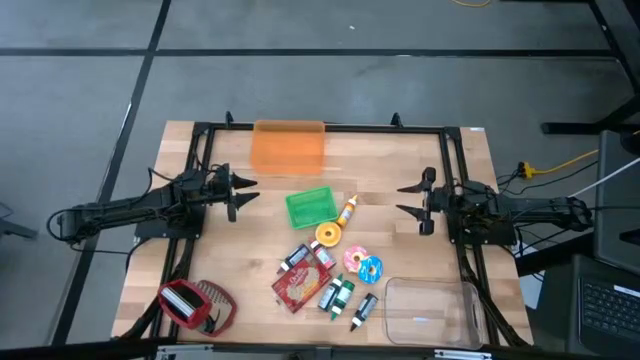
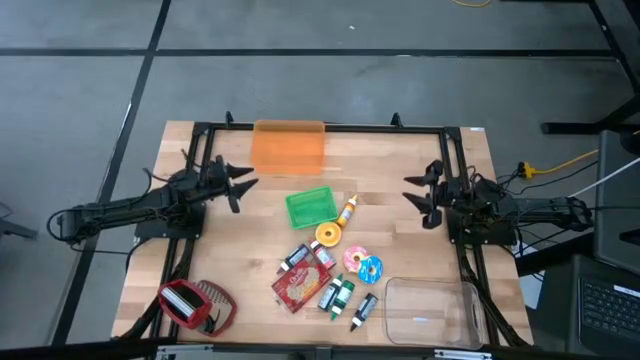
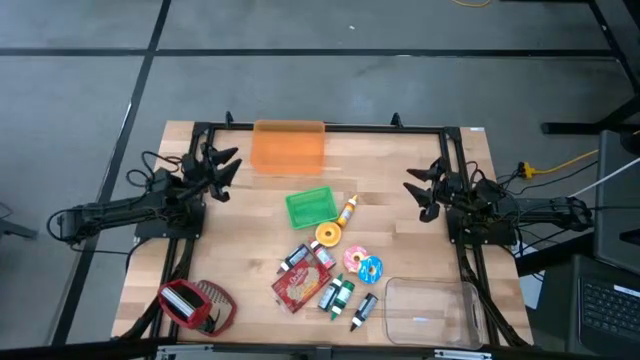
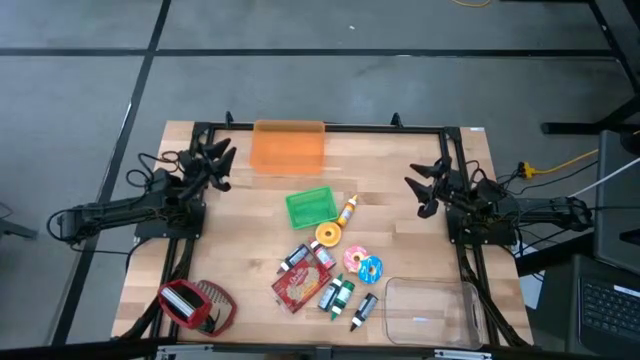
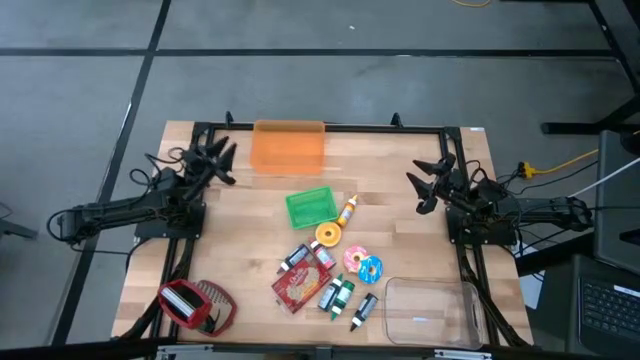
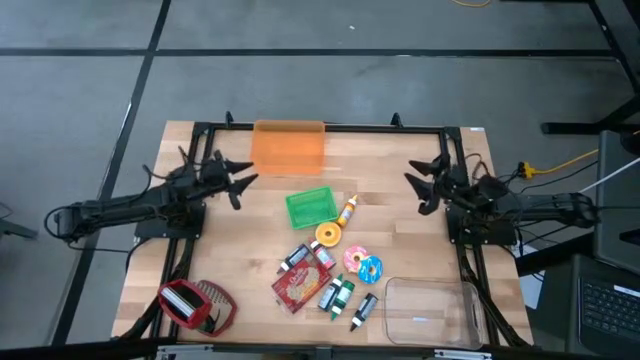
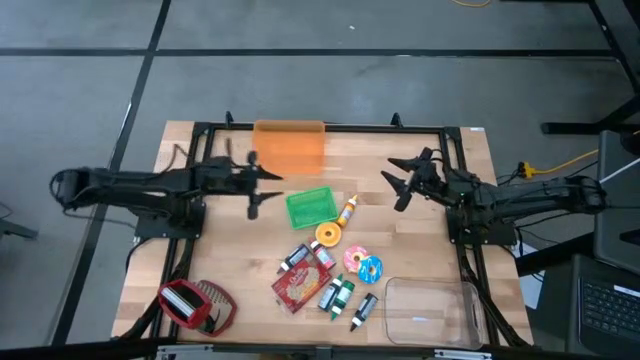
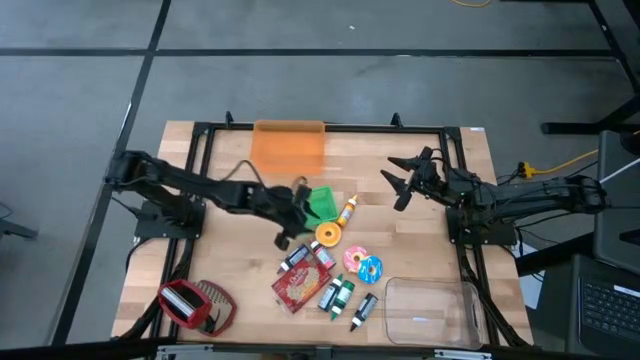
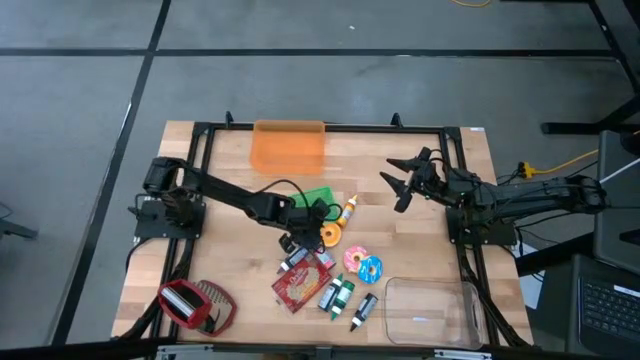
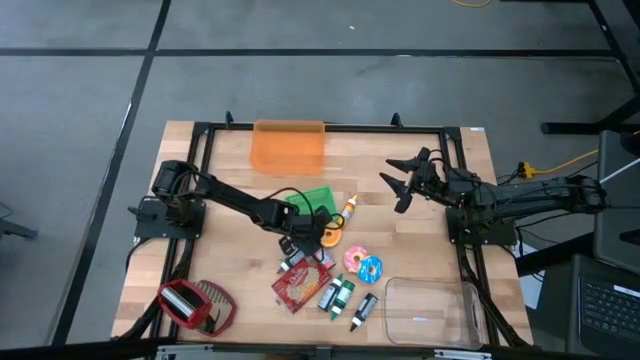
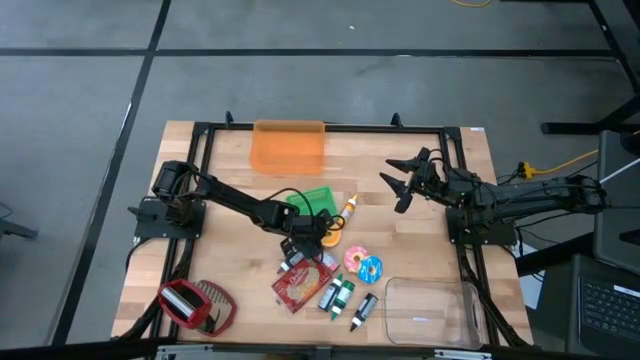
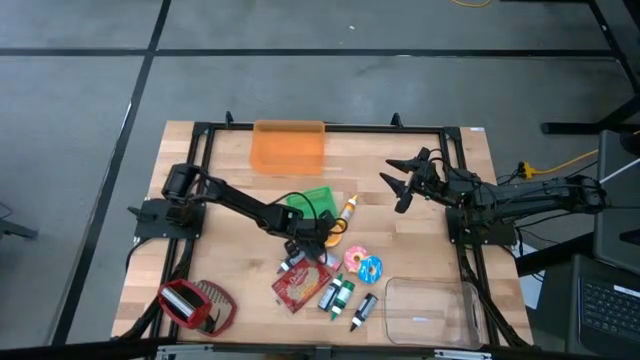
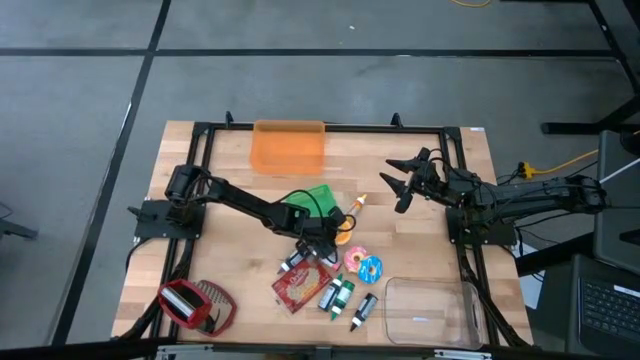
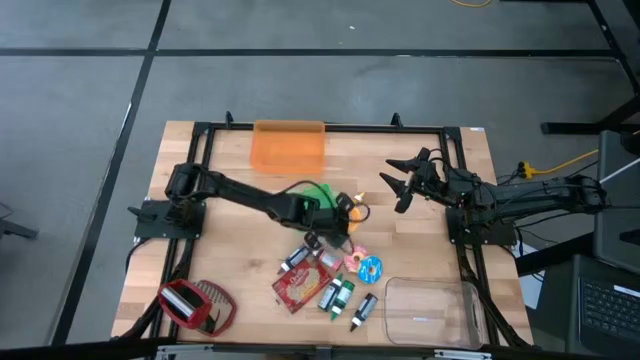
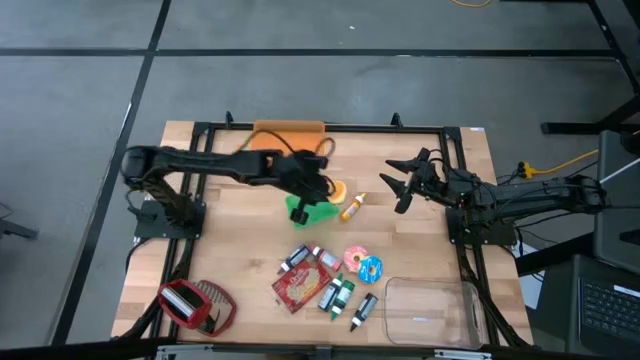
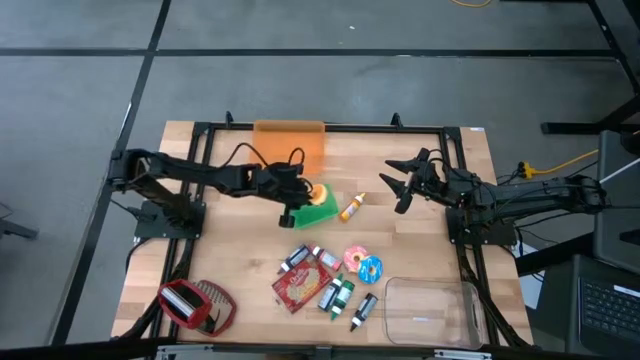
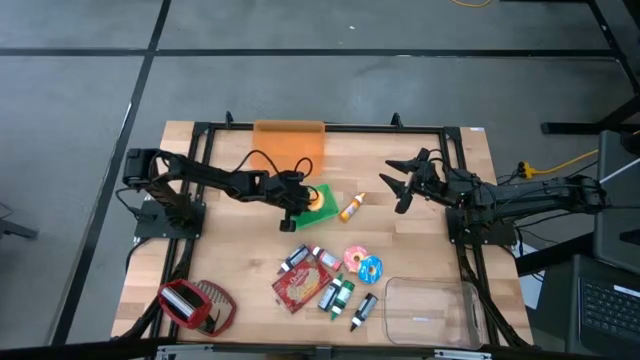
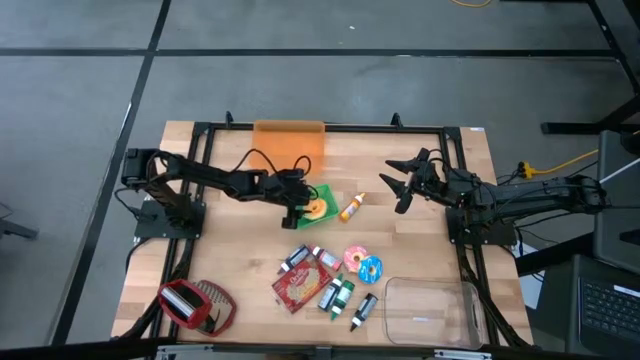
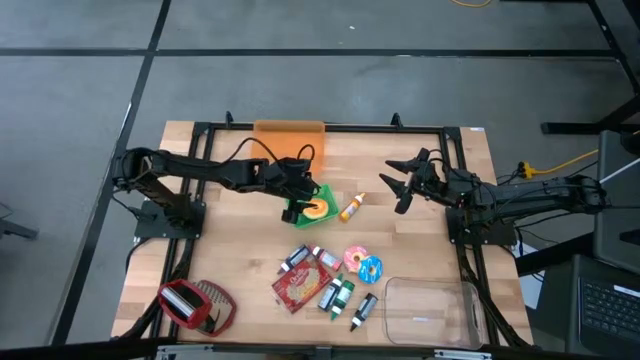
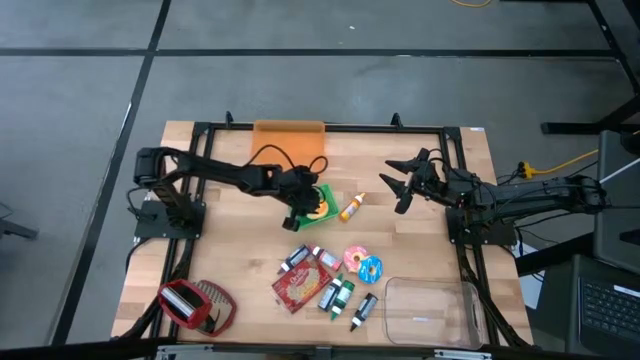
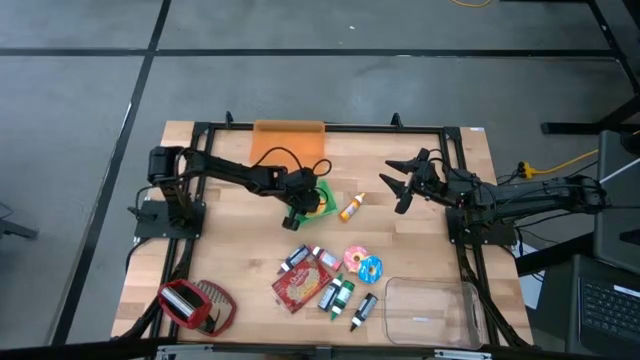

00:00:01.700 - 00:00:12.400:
Put the orange donut into the green bin

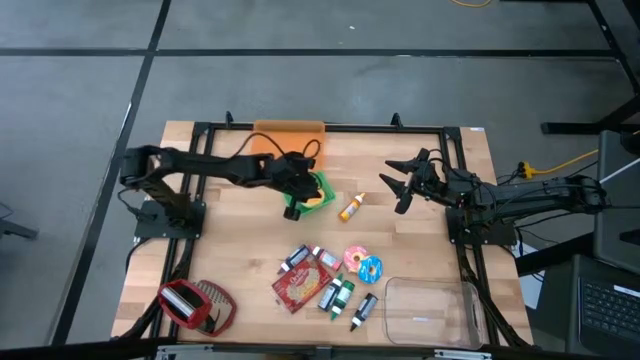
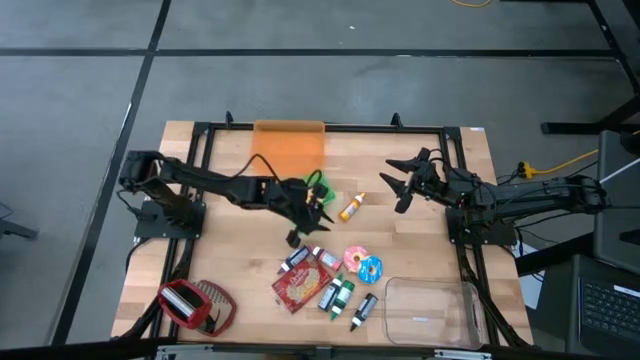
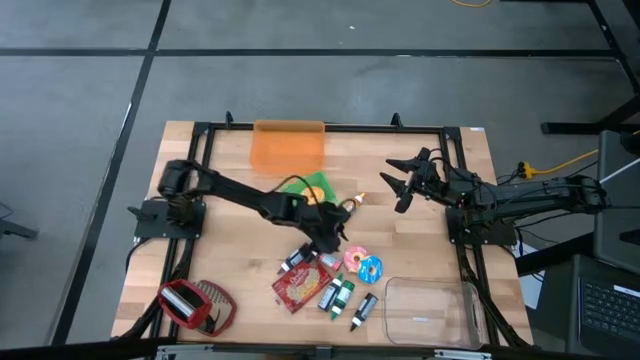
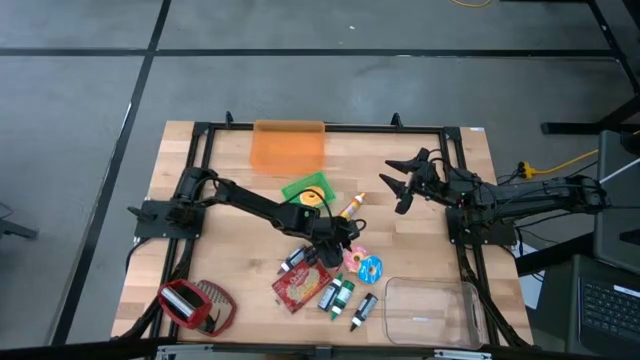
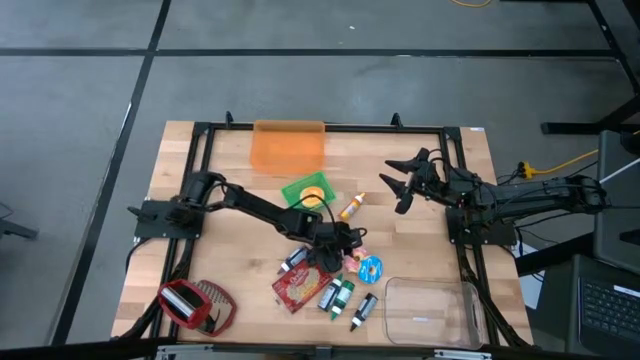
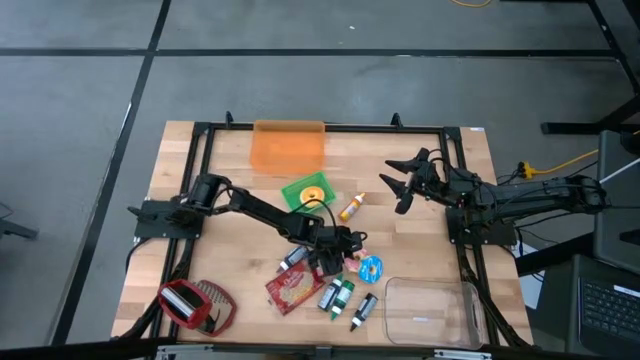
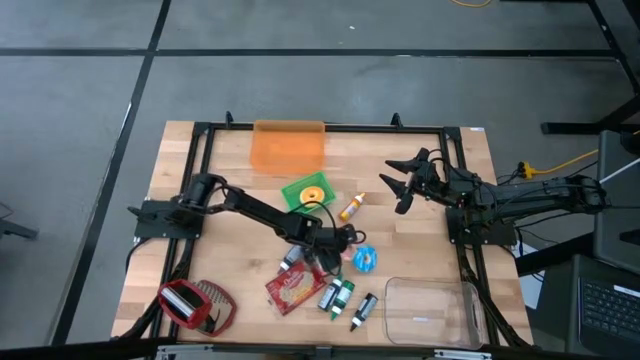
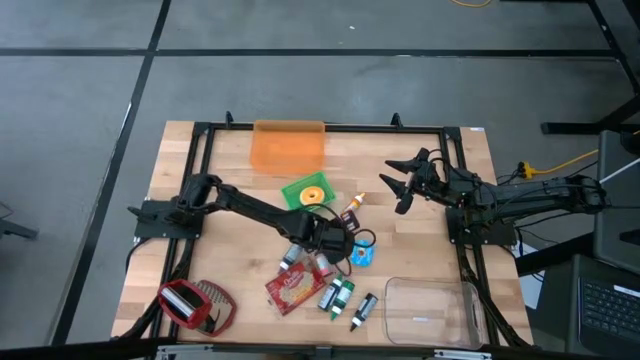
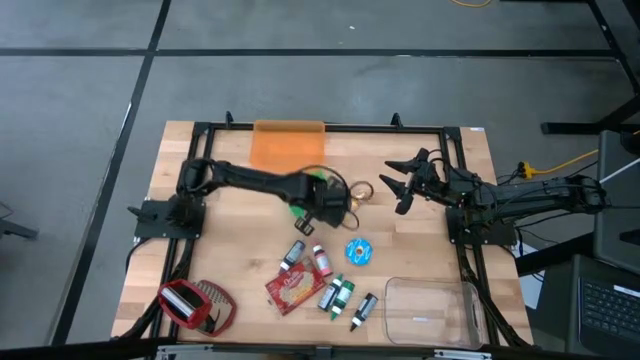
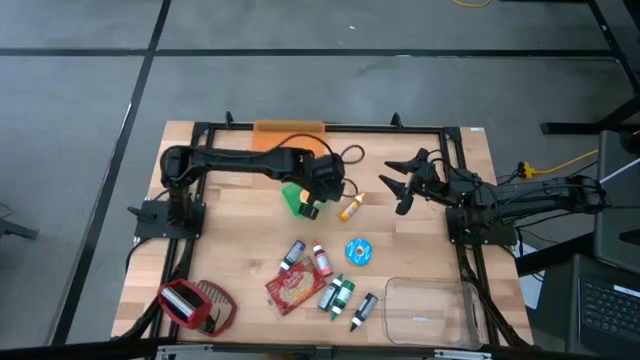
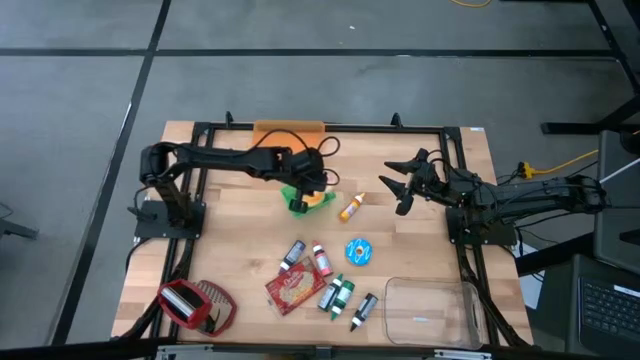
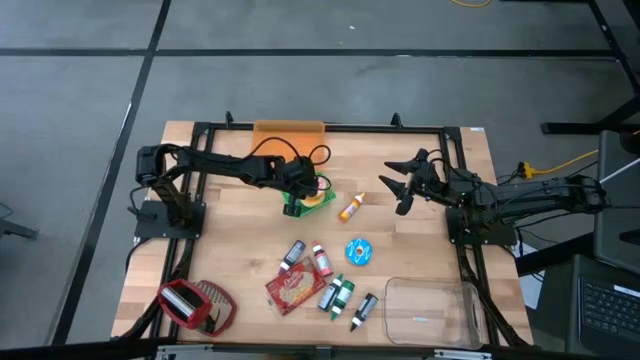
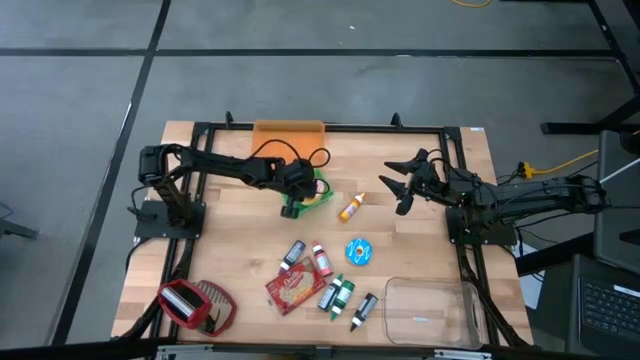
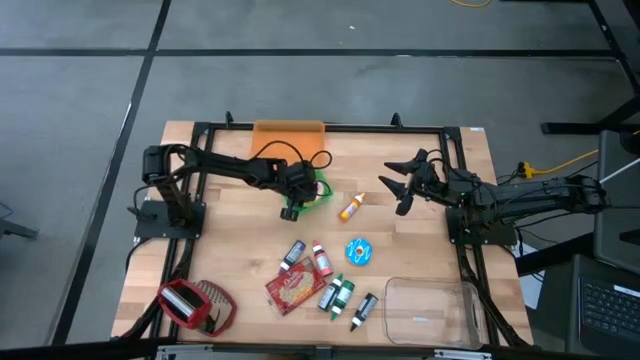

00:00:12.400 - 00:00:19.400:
Put the pink donut into the green bin

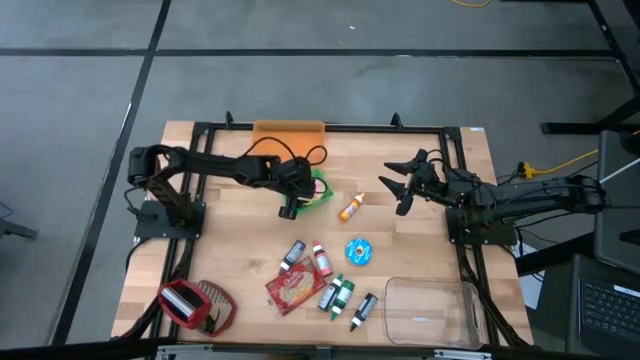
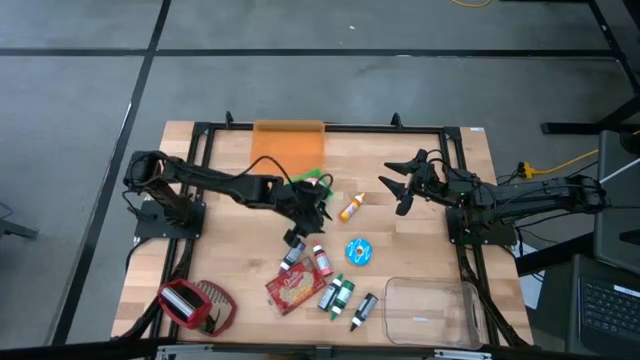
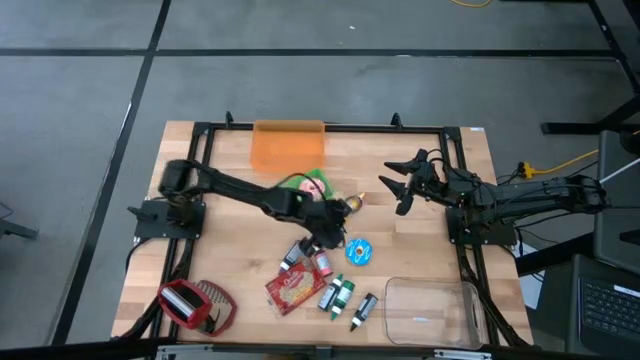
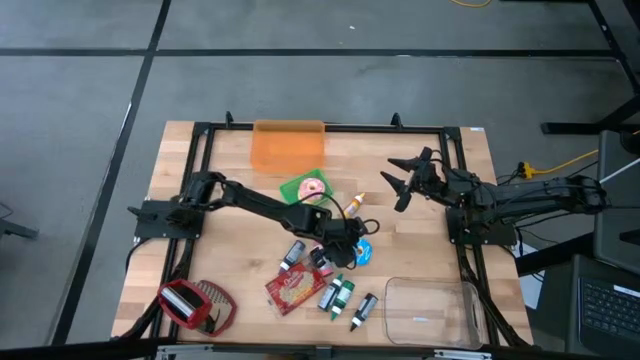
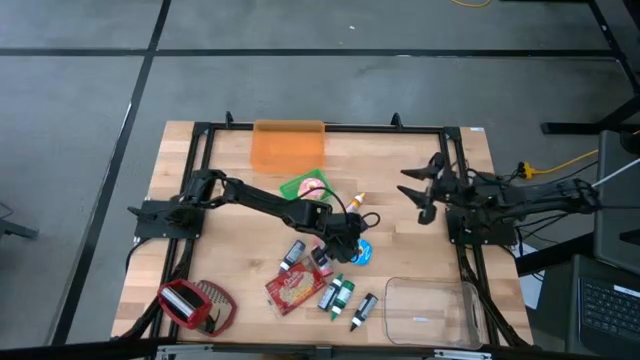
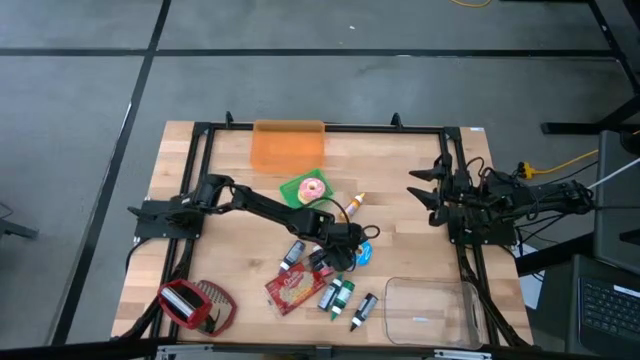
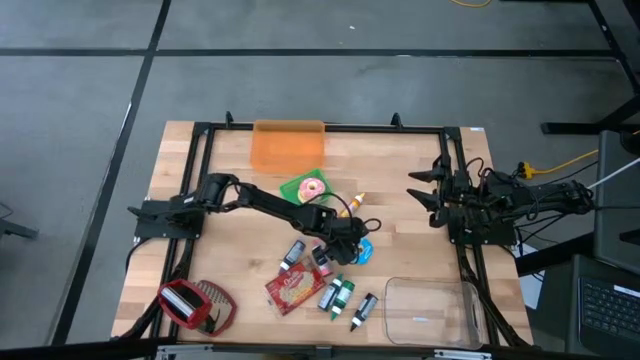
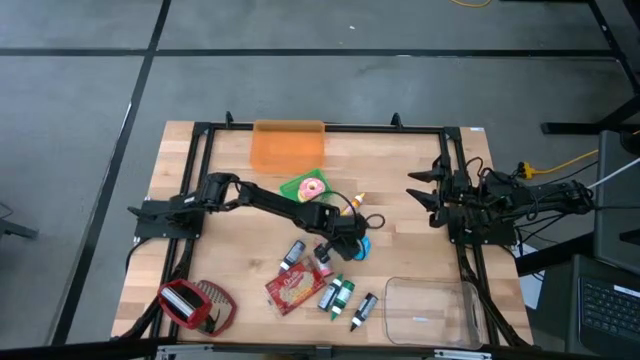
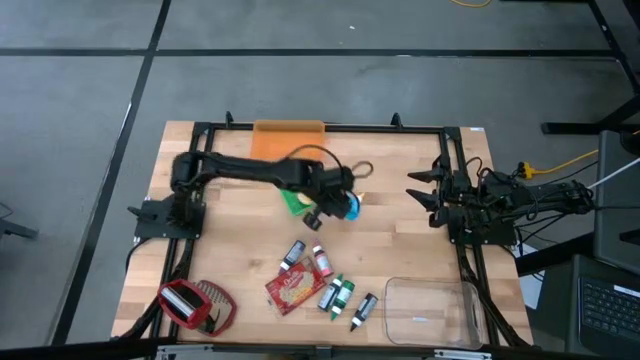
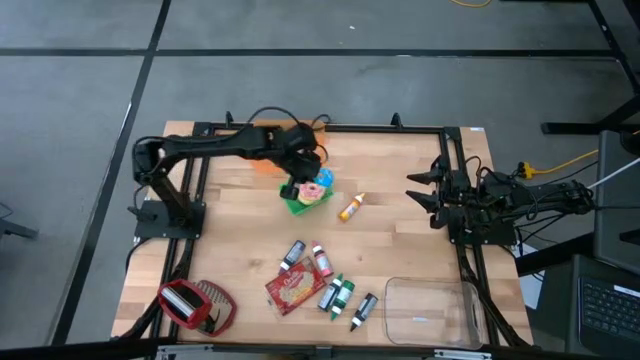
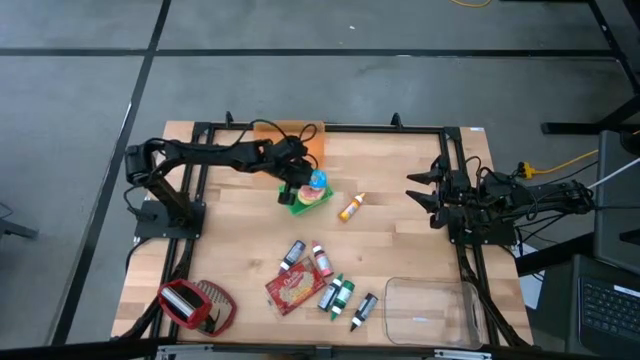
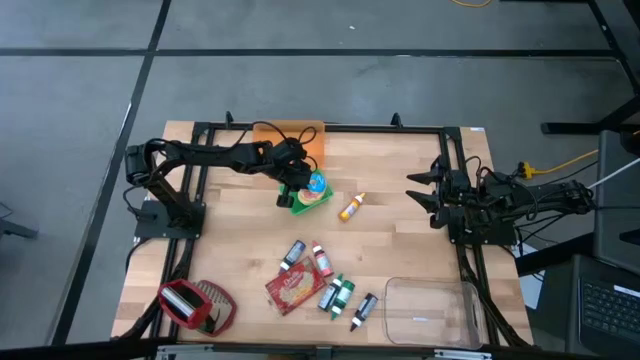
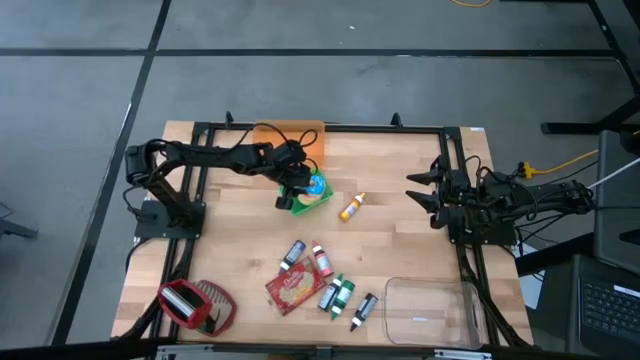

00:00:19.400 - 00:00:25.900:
Put the blue donut into the green bin
